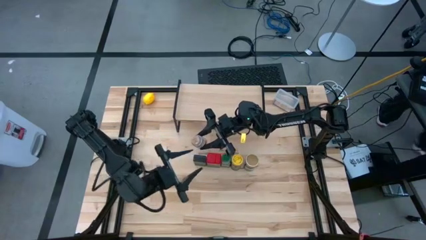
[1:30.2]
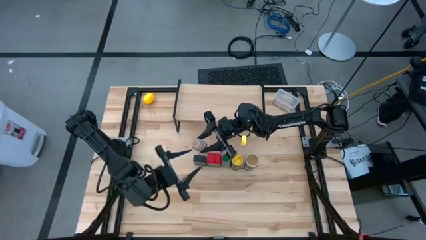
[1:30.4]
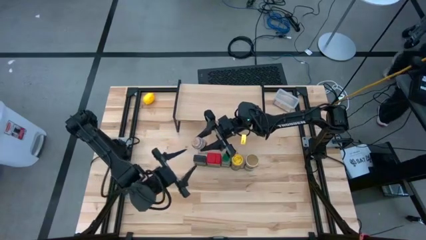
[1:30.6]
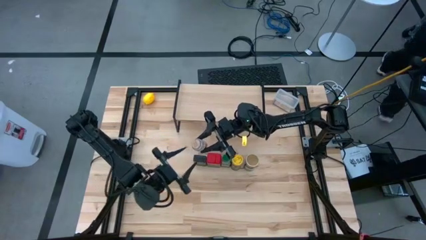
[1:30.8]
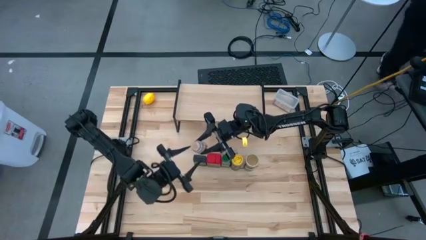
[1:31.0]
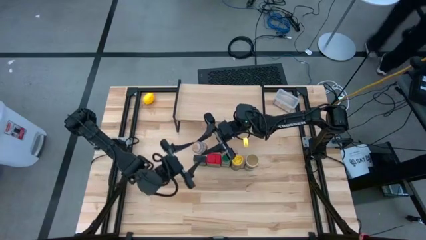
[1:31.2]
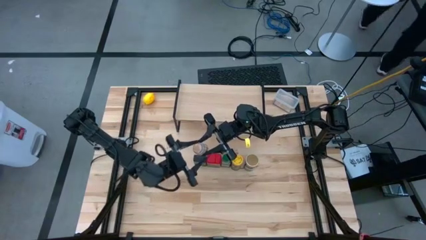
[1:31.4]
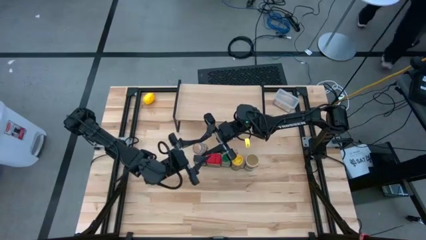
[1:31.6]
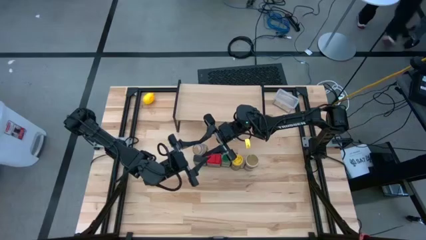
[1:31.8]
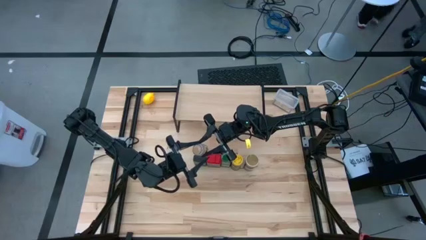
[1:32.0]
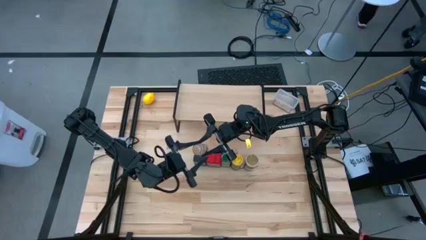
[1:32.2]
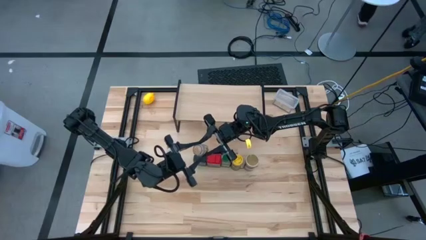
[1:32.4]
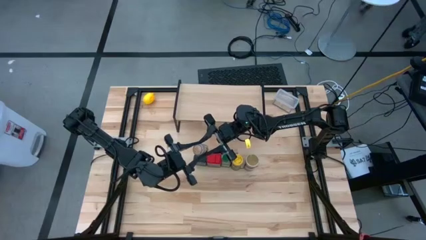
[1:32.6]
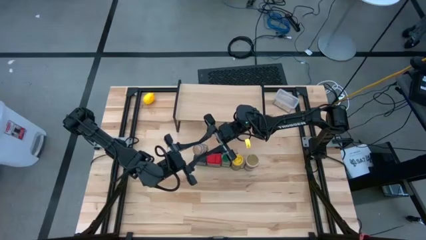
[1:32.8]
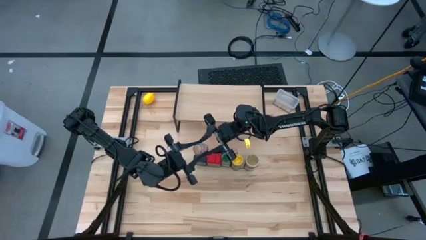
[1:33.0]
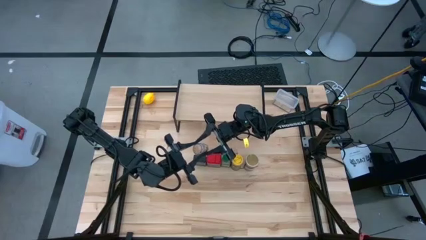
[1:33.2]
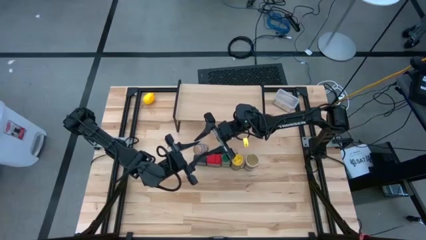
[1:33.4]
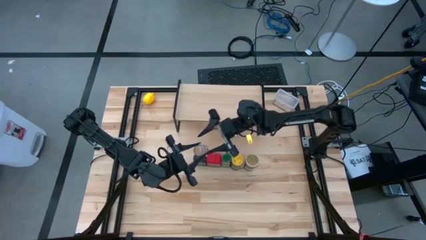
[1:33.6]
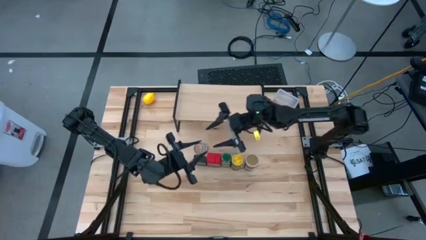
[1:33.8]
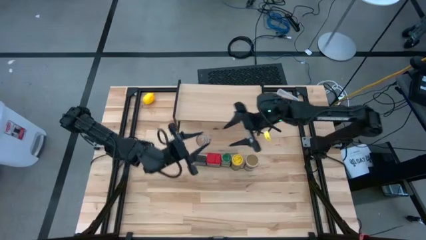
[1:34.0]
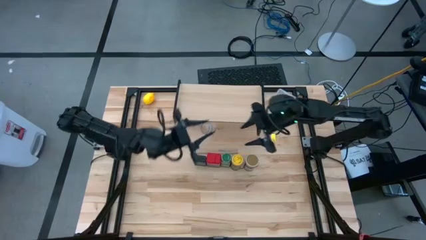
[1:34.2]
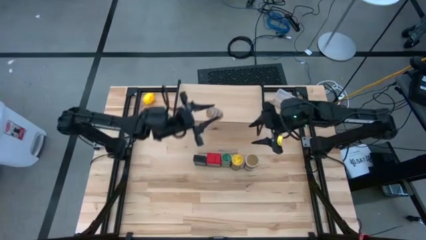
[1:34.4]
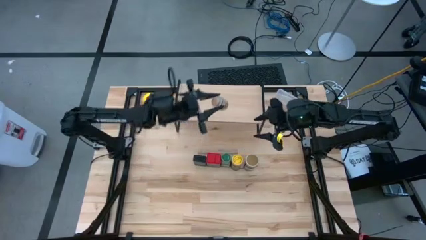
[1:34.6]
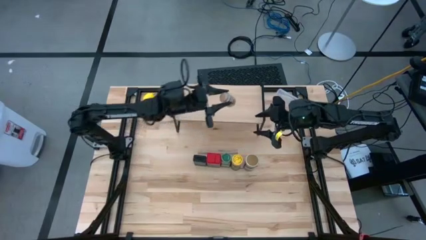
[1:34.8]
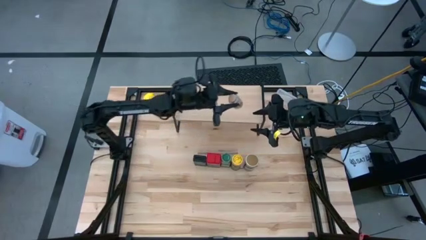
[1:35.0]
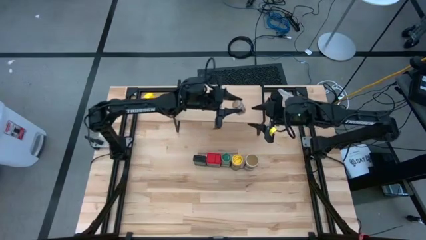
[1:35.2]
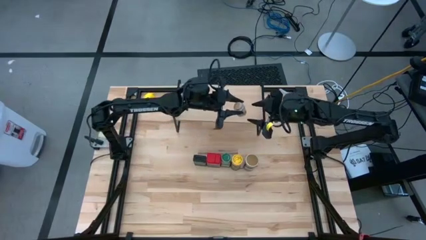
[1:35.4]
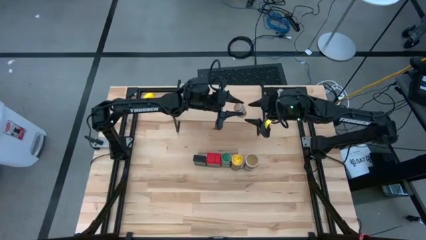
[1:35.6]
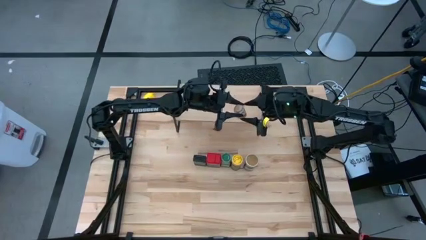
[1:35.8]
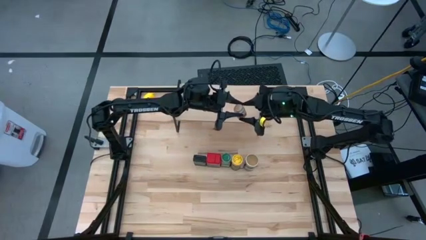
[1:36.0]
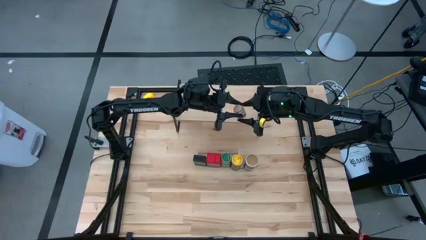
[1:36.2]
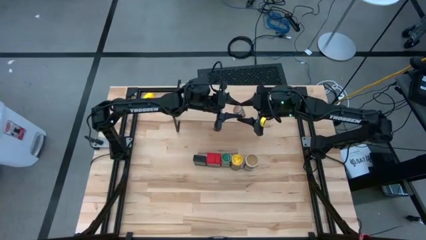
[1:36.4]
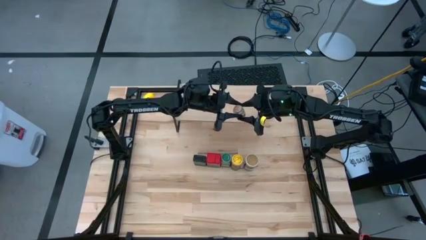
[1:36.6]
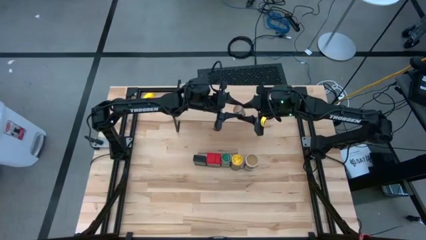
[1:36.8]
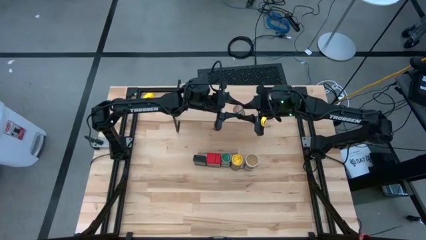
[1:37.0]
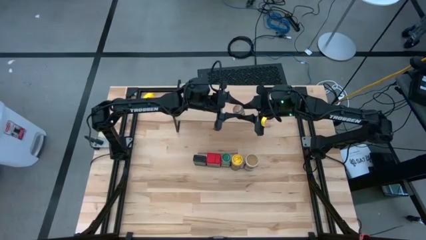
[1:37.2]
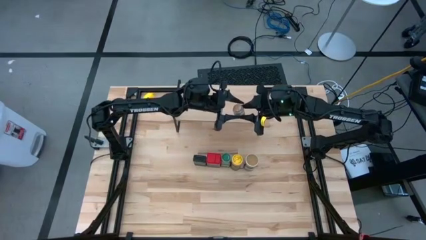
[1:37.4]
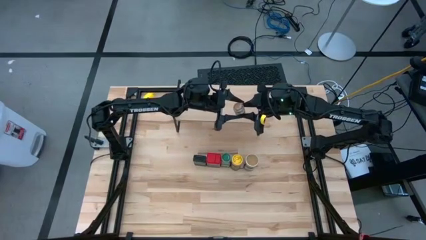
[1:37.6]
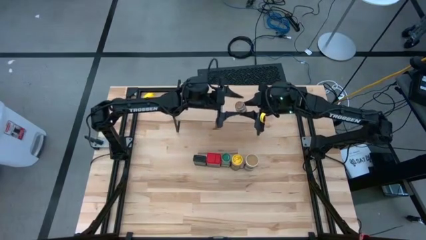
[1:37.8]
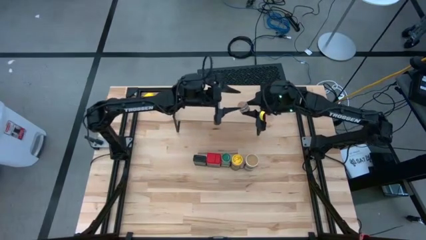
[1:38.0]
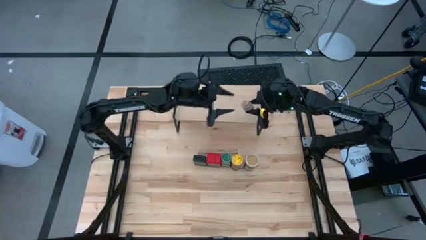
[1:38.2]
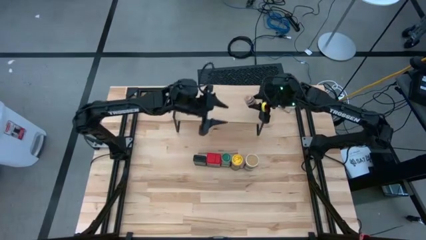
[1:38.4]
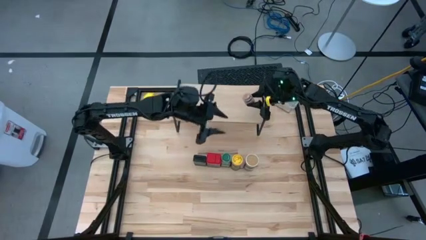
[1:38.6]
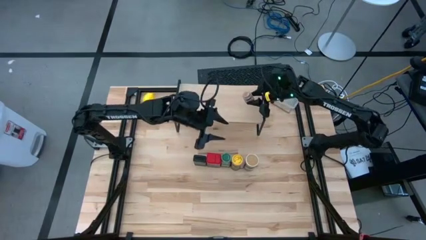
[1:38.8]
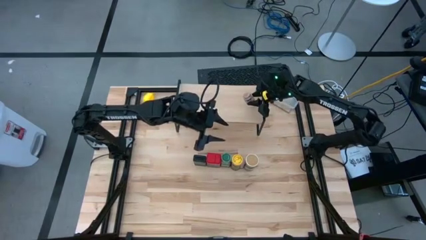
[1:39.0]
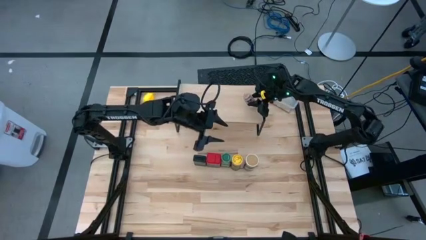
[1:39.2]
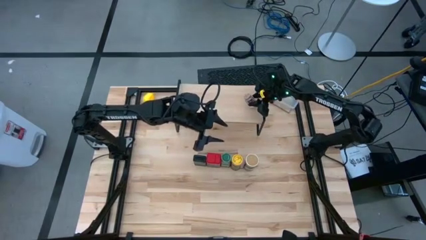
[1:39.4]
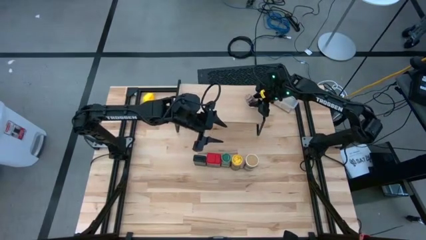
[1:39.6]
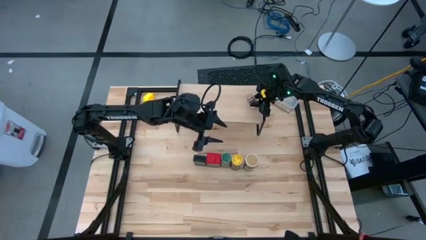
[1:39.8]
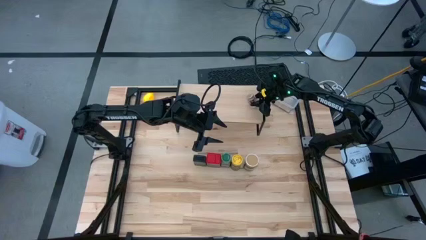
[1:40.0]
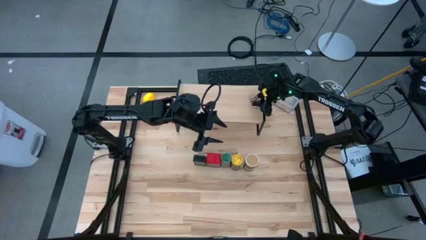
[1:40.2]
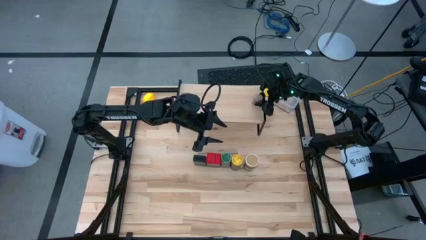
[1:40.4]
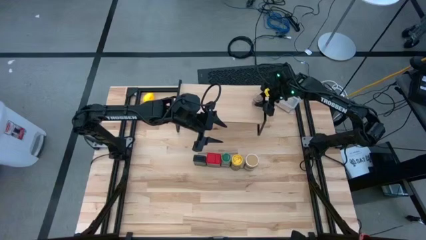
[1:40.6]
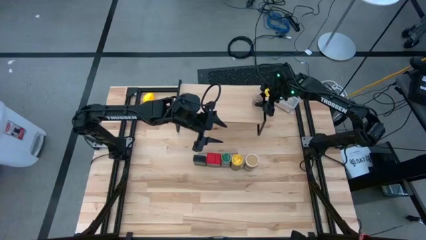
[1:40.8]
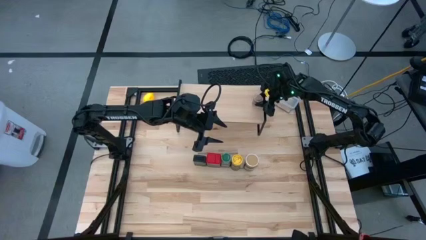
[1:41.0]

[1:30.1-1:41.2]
Task: Shelf spices
Put the transparent seasoning bottle on the shelf
